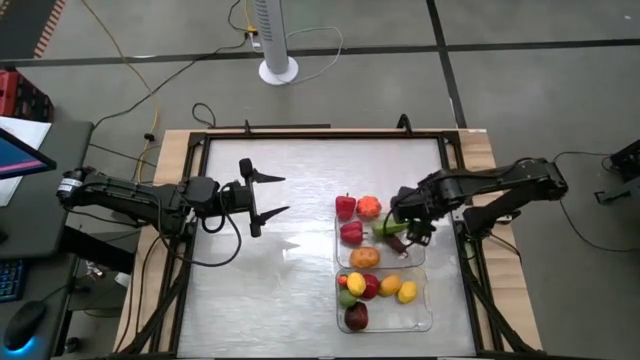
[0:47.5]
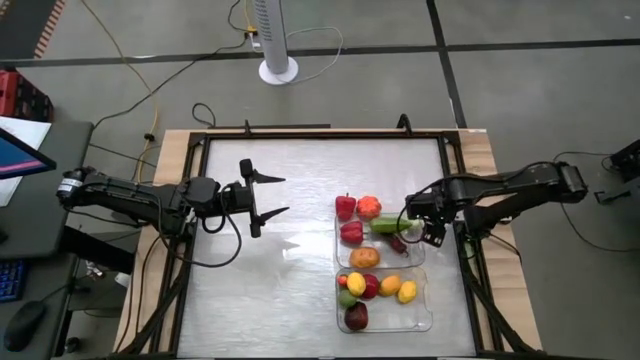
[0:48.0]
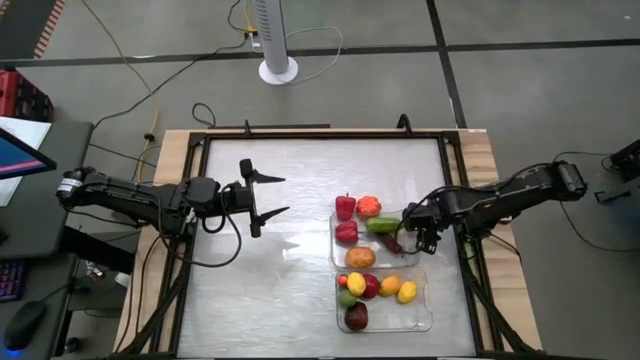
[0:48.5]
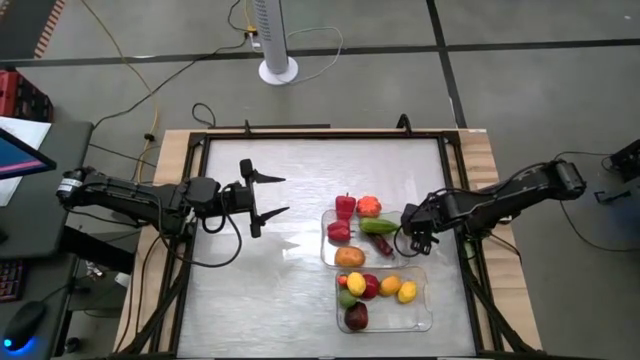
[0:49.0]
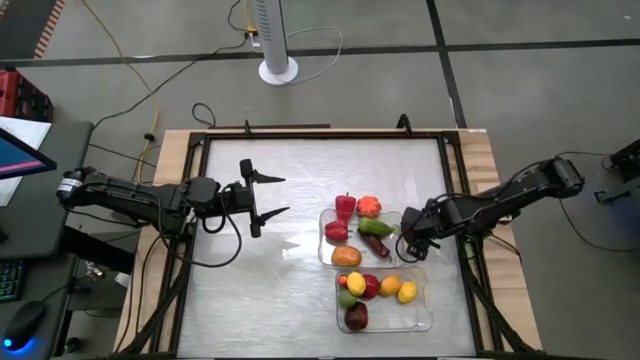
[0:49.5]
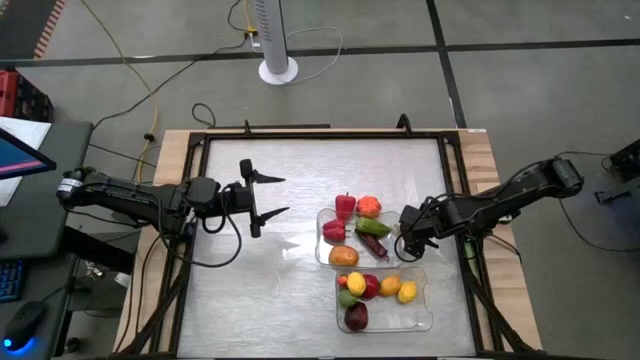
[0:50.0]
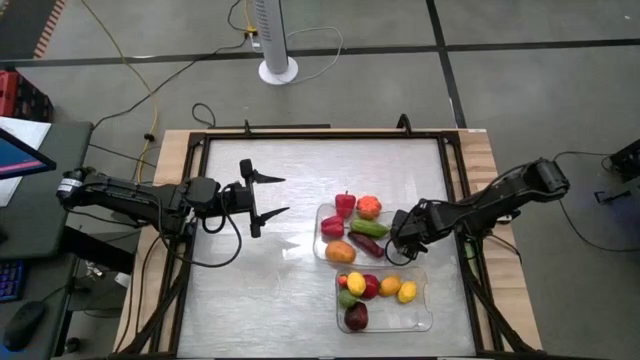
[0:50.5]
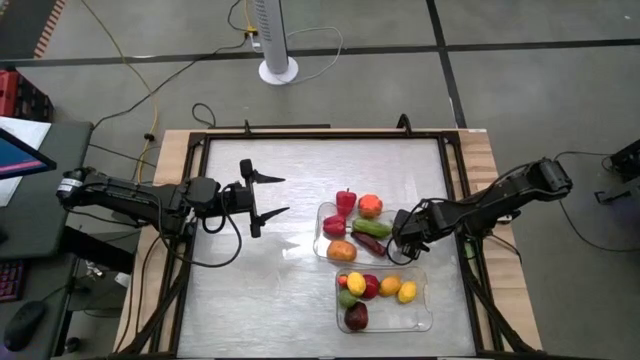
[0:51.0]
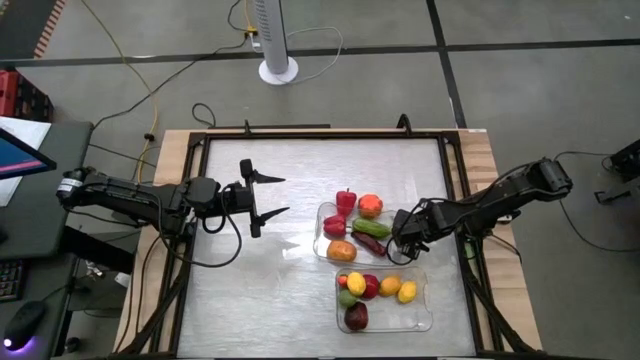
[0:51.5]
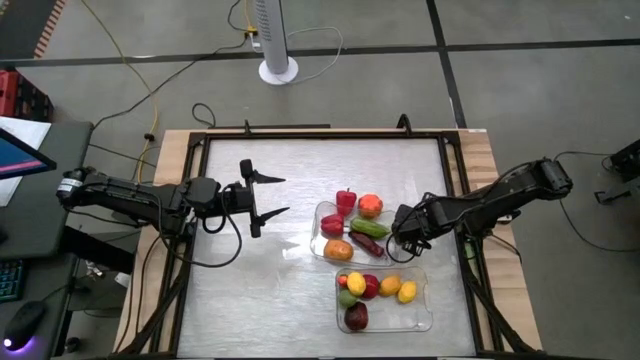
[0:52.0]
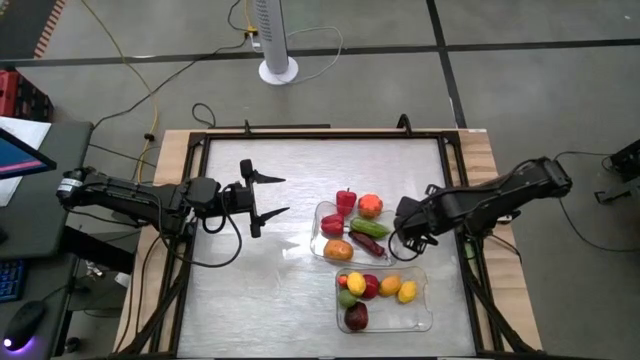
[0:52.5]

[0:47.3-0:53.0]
Task: Sort produce into baskets
Put the garlic into the top transparent bin

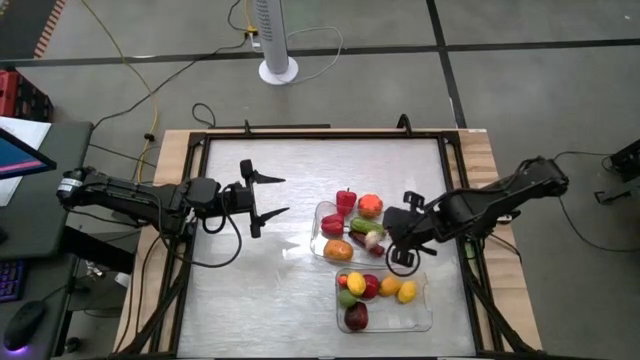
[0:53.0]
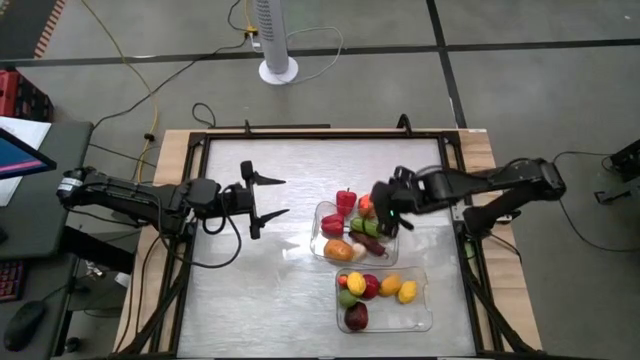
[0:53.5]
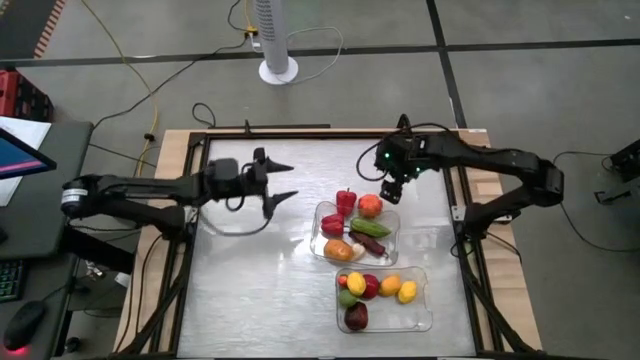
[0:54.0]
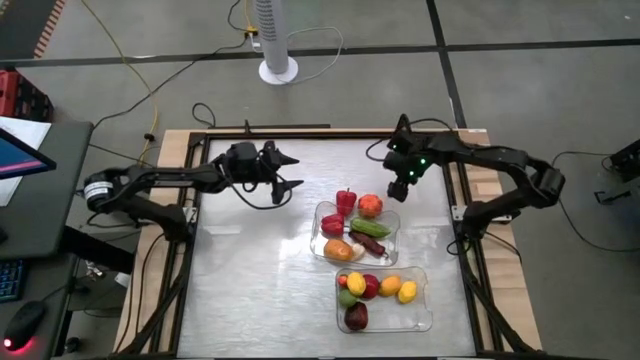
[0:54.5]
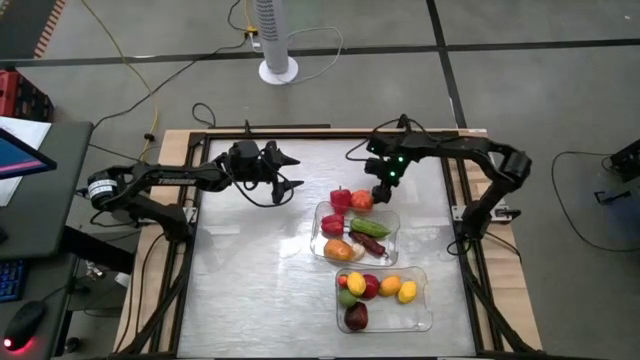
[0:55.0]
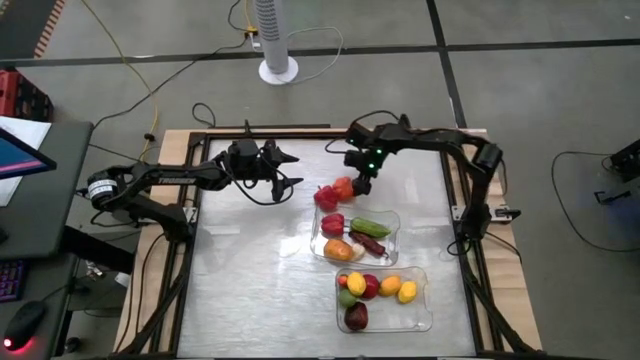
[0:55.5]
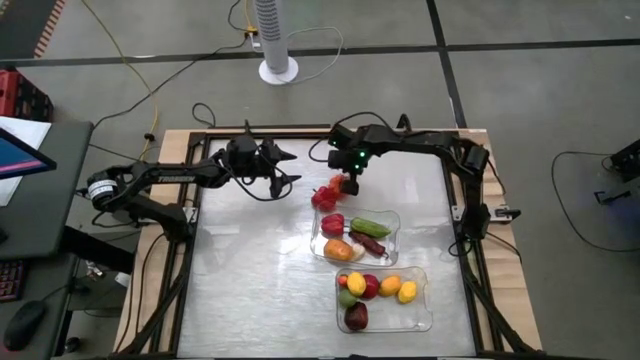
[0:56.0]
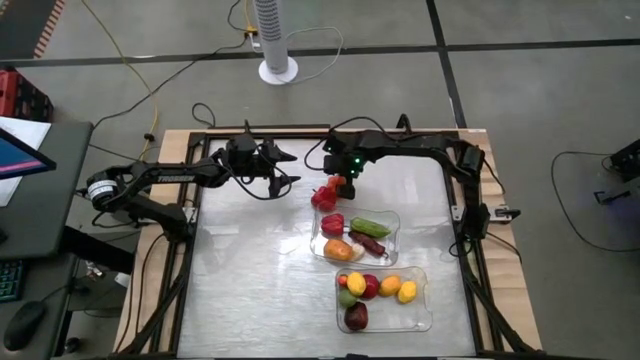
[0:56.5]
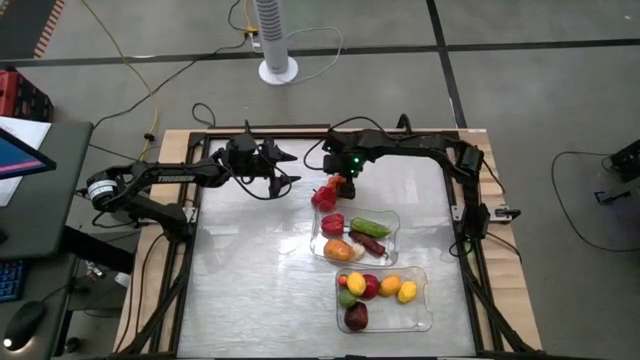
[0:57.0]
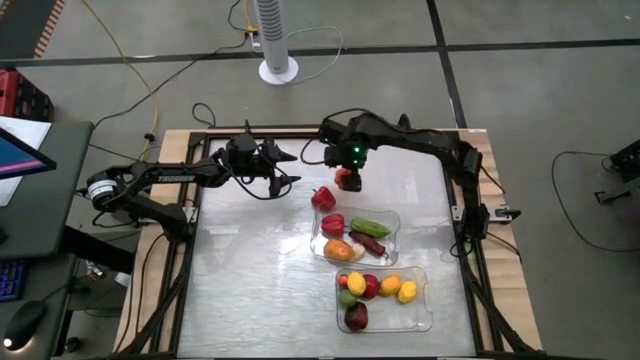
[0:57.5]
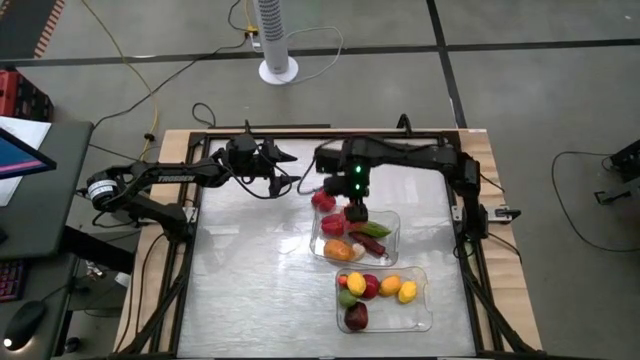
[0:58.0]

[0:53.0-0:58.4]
Put the pumpkin into the top transparent bin

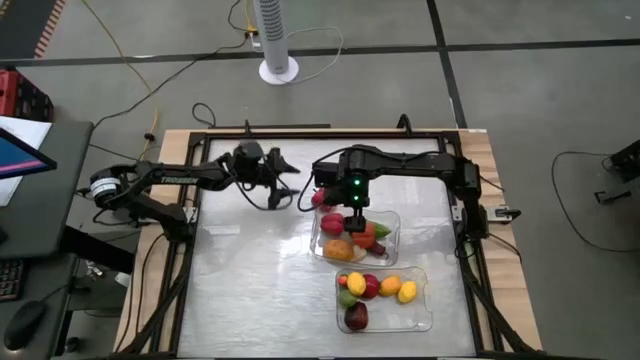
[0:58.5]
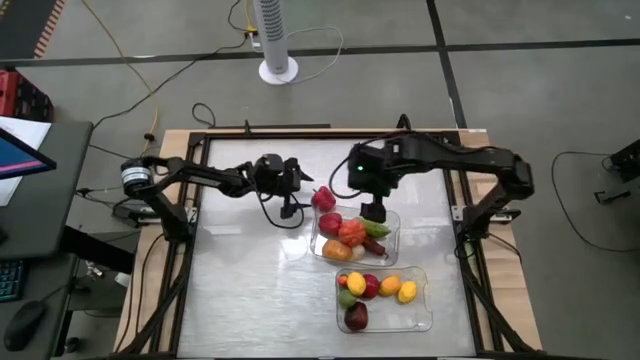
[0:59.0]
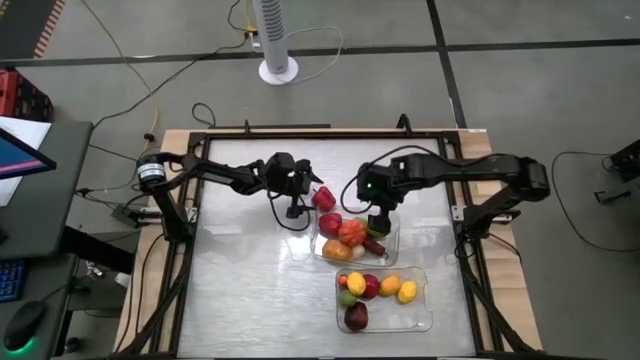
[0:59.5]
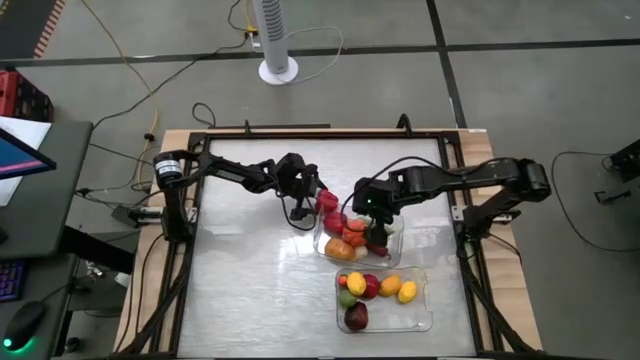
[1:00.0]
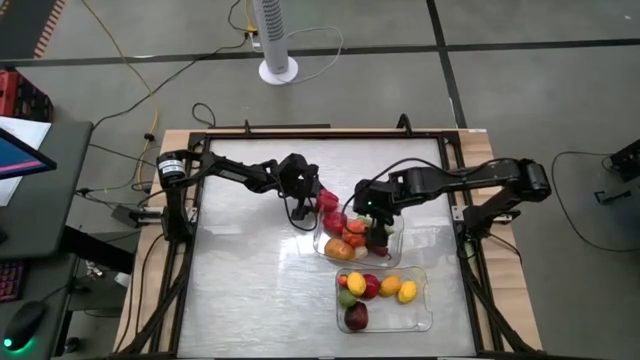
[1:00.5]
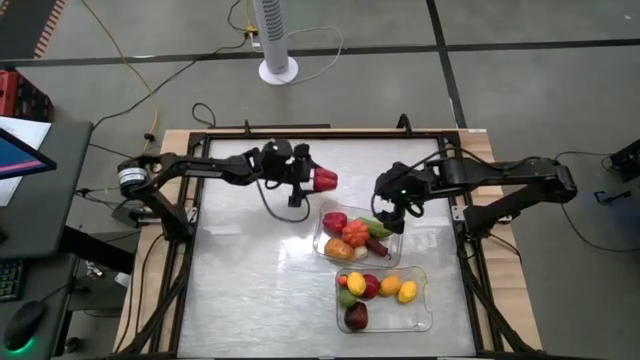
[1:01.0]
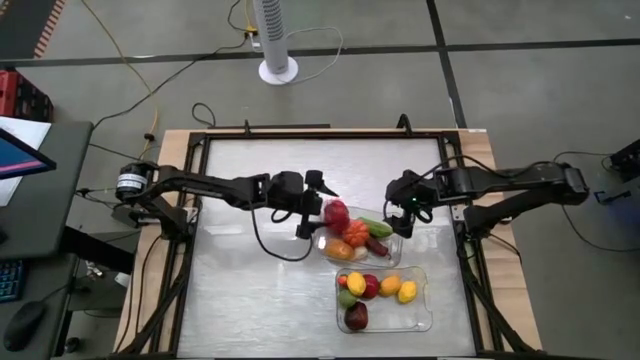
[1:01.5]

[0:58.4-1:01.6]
Put the bell pepper into the top transparent bin

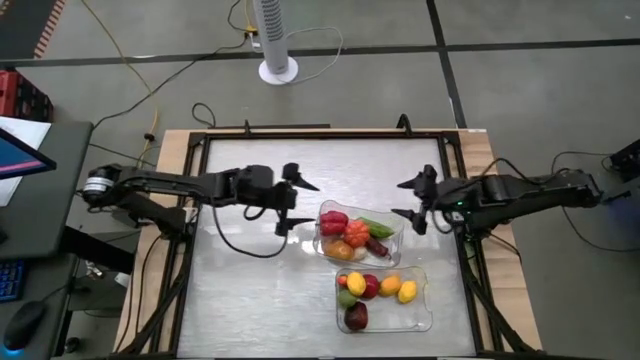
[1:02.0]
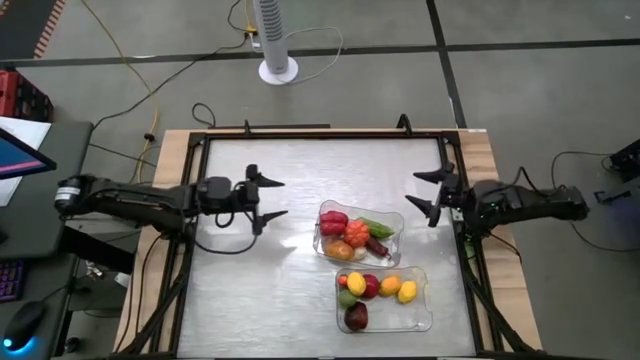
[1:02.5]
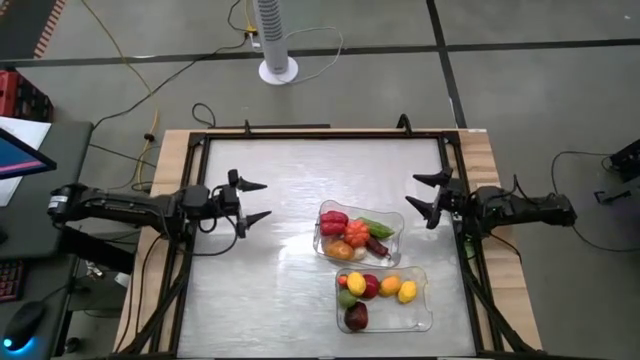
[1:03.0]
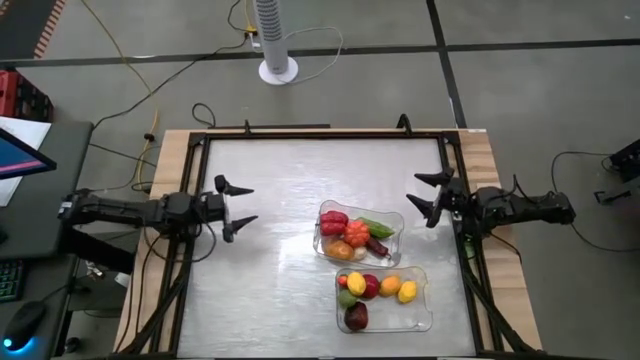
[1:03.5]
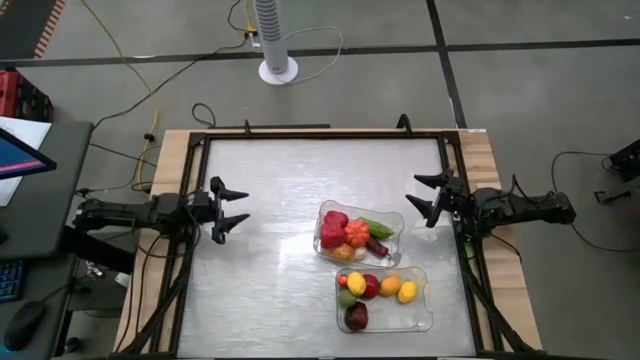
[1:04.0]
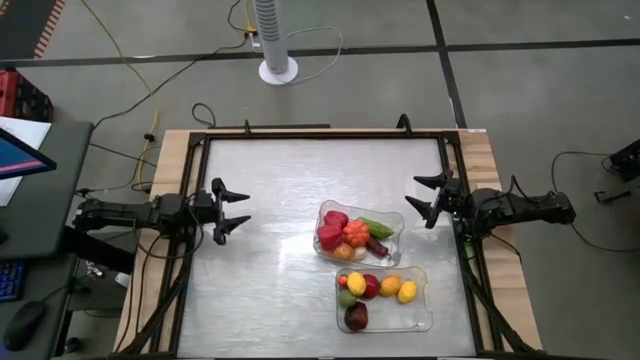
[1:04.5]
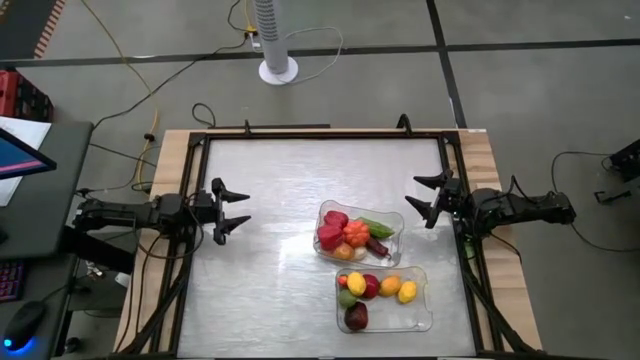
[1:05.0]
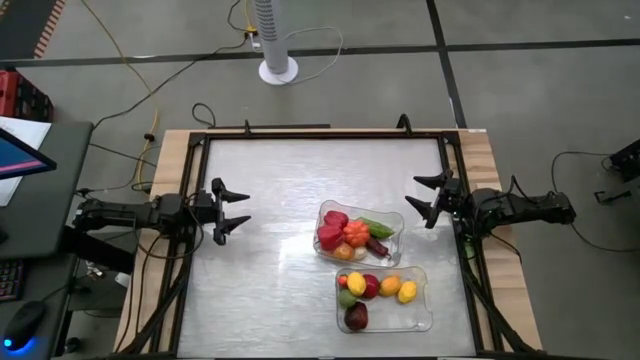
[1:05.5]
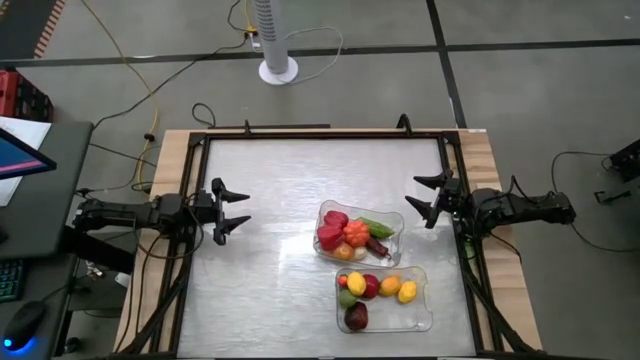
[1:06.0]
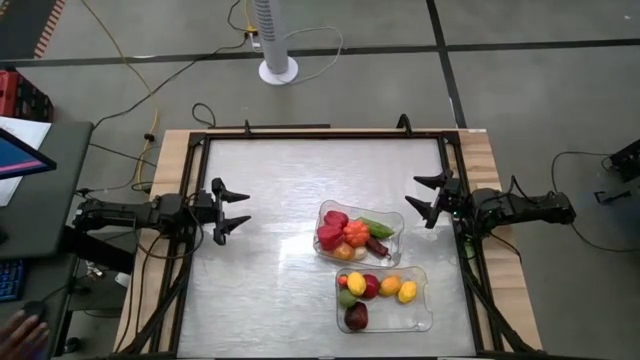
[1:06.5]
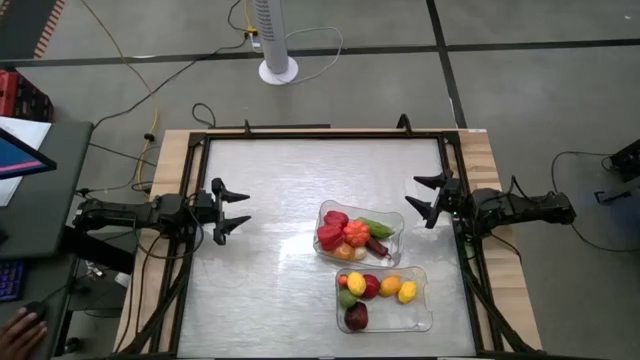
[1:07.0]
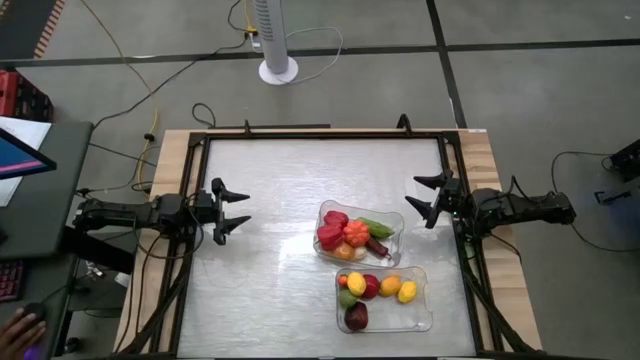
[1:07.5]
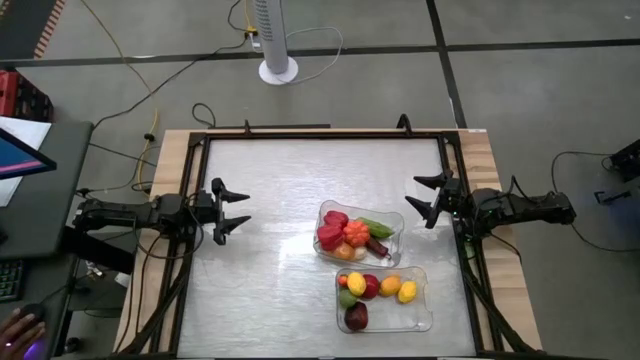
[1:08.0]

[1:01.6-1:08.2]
Return to Home Position
